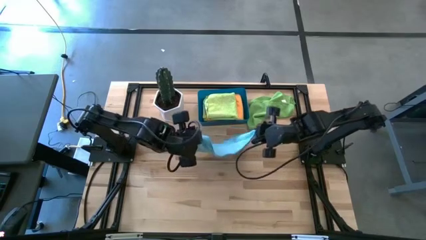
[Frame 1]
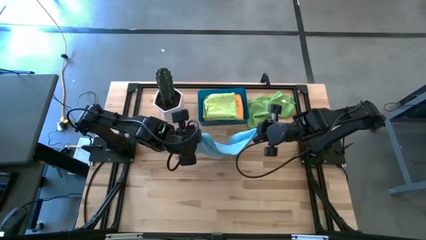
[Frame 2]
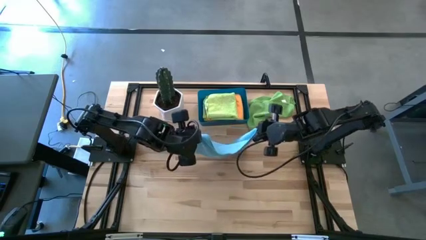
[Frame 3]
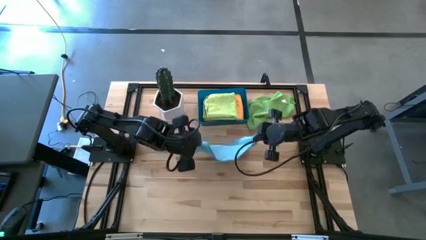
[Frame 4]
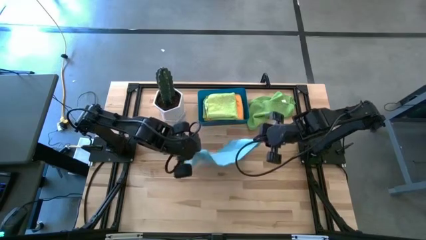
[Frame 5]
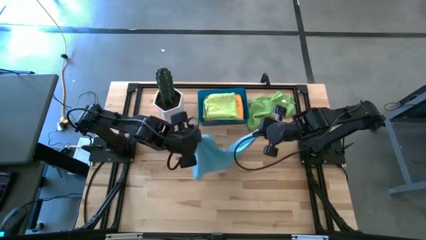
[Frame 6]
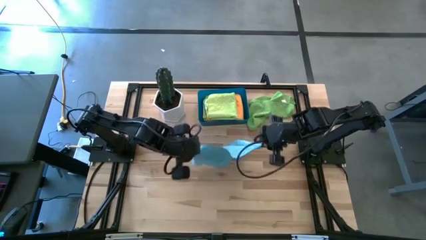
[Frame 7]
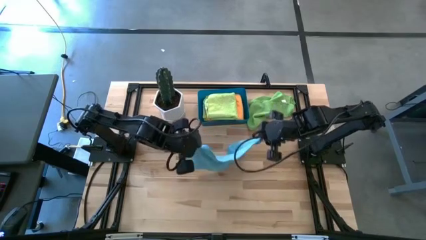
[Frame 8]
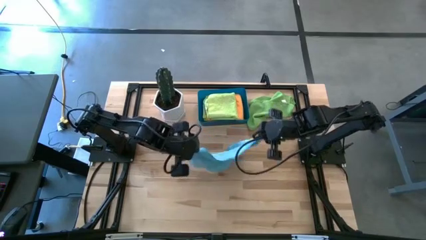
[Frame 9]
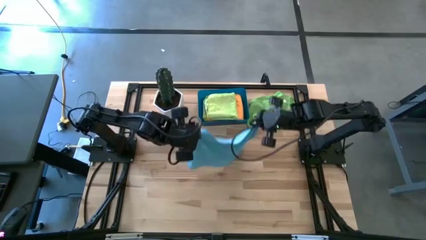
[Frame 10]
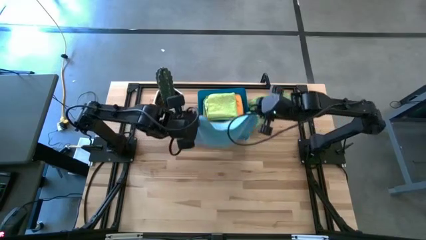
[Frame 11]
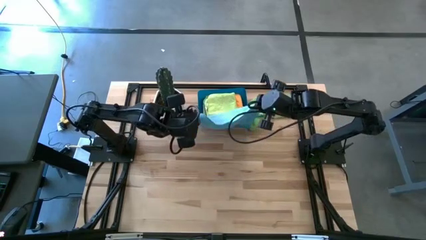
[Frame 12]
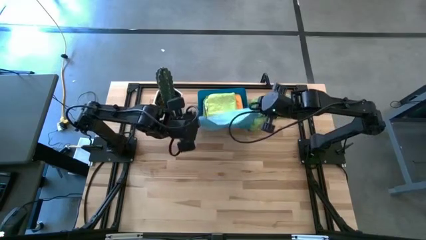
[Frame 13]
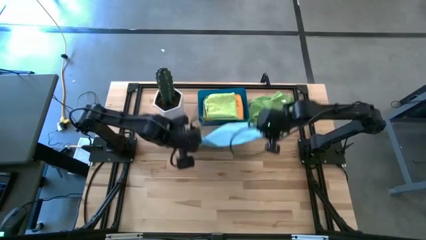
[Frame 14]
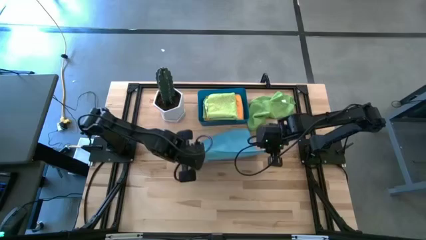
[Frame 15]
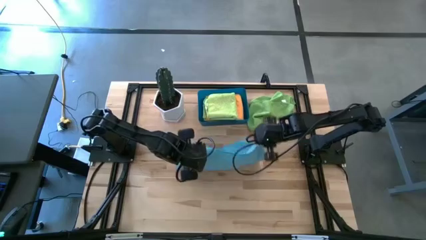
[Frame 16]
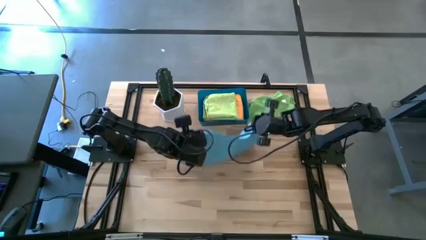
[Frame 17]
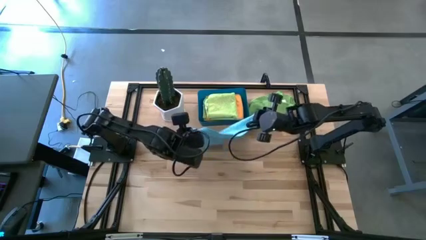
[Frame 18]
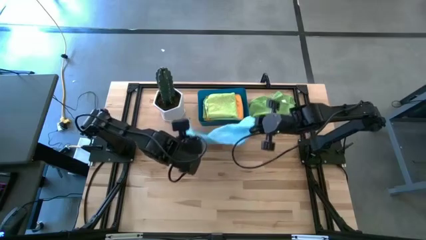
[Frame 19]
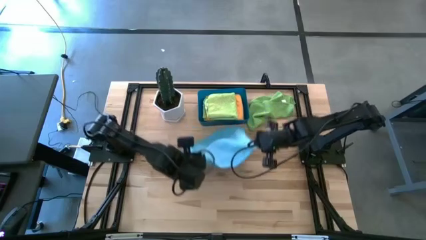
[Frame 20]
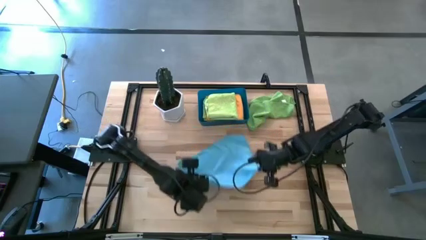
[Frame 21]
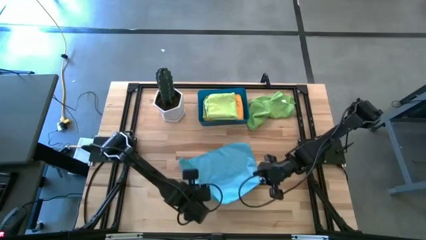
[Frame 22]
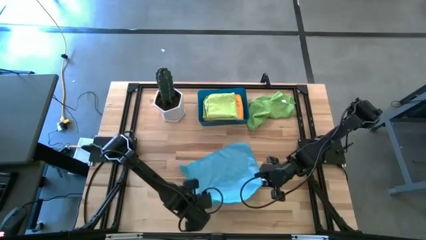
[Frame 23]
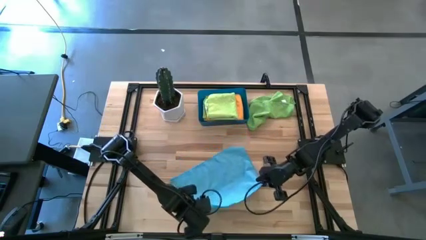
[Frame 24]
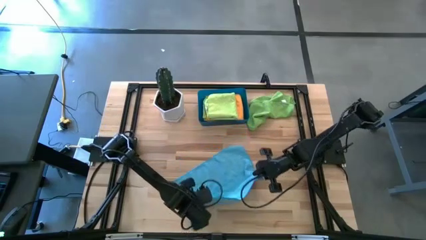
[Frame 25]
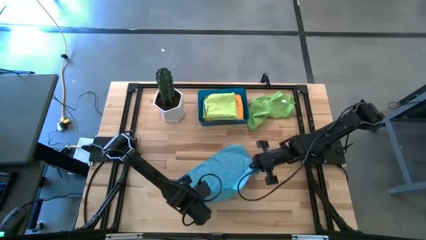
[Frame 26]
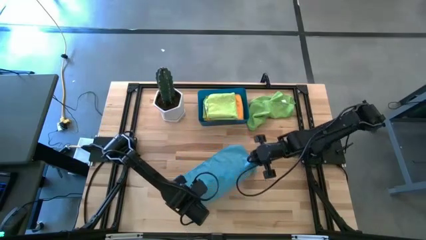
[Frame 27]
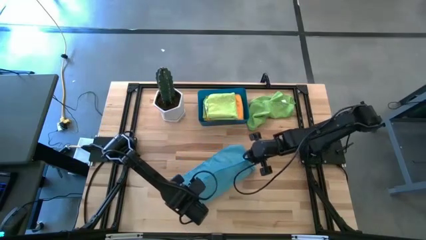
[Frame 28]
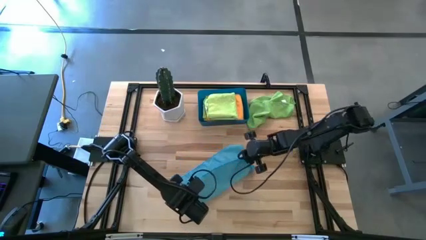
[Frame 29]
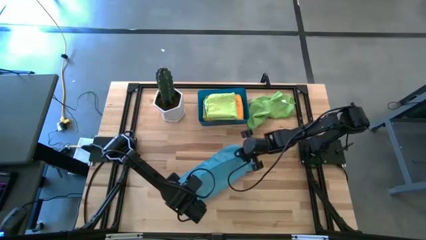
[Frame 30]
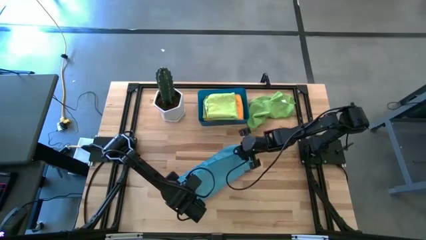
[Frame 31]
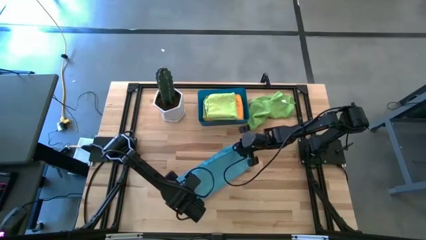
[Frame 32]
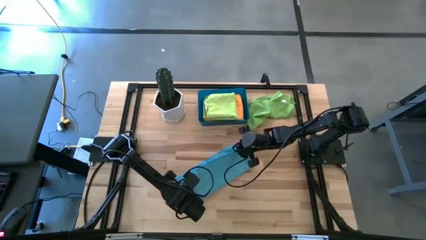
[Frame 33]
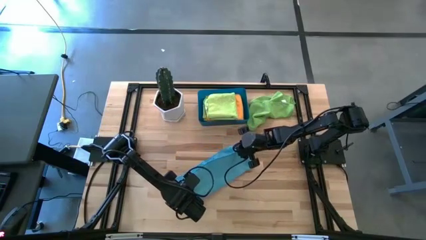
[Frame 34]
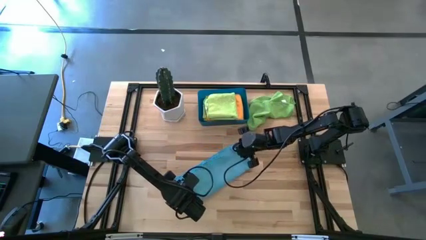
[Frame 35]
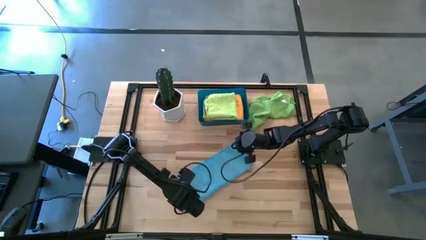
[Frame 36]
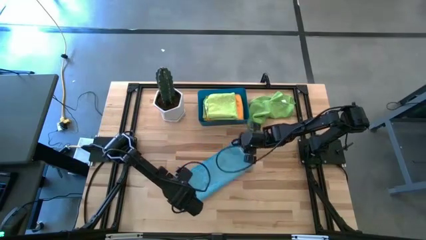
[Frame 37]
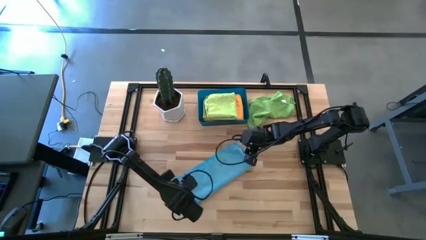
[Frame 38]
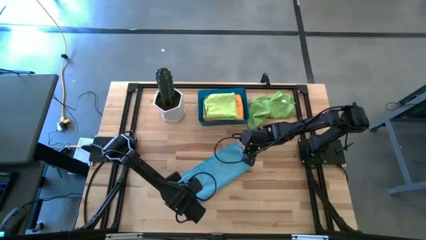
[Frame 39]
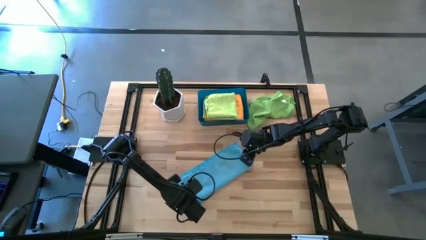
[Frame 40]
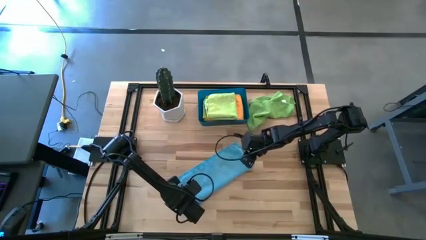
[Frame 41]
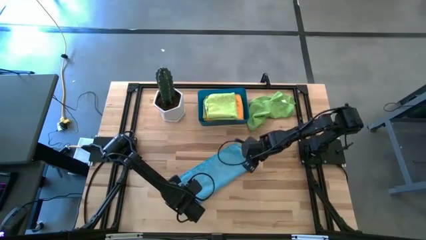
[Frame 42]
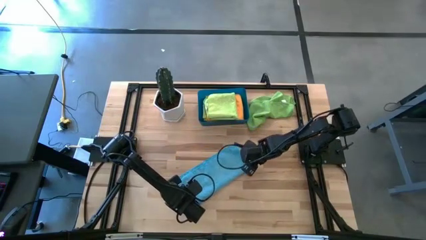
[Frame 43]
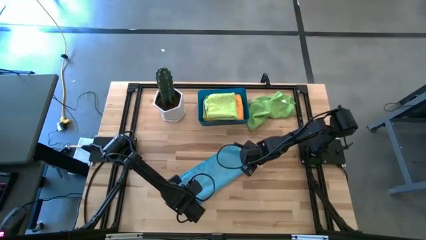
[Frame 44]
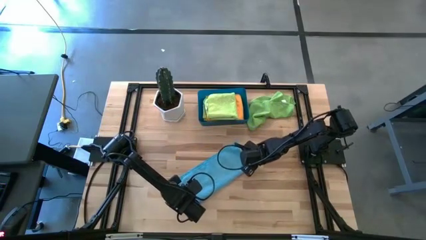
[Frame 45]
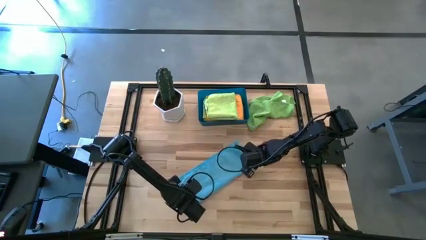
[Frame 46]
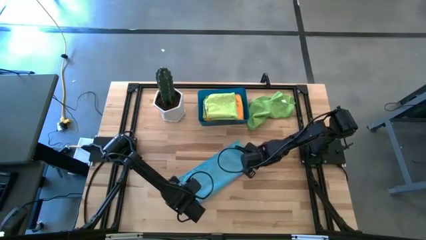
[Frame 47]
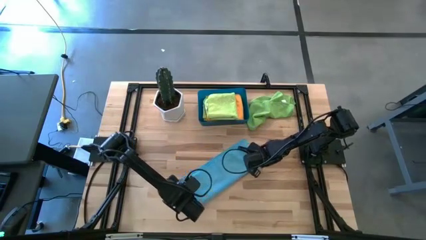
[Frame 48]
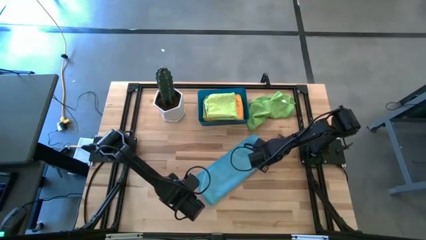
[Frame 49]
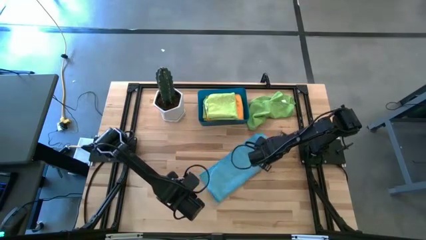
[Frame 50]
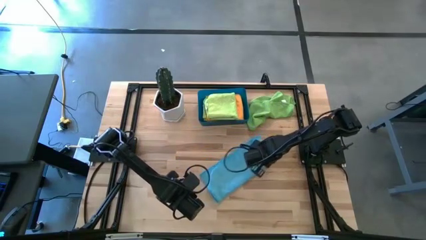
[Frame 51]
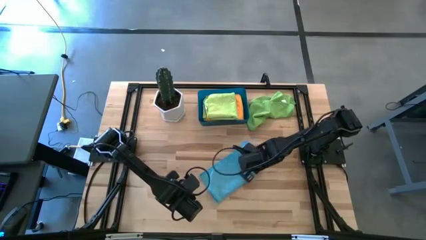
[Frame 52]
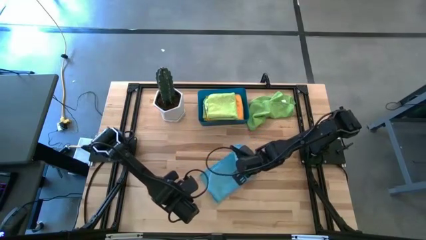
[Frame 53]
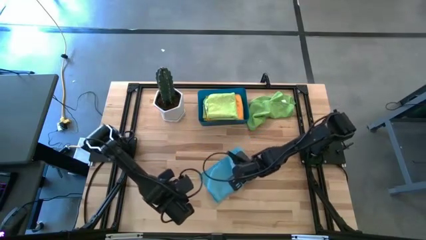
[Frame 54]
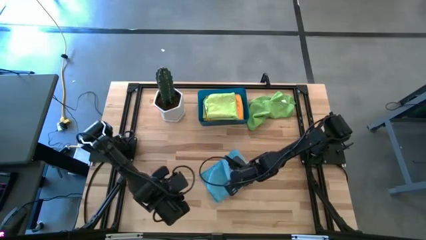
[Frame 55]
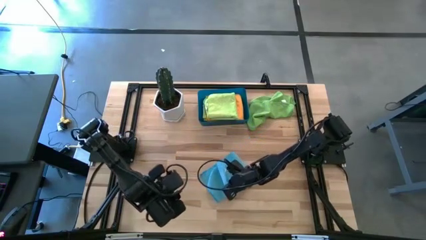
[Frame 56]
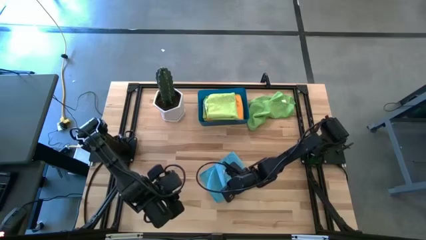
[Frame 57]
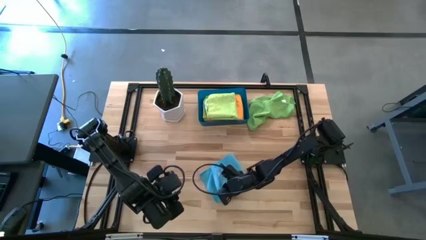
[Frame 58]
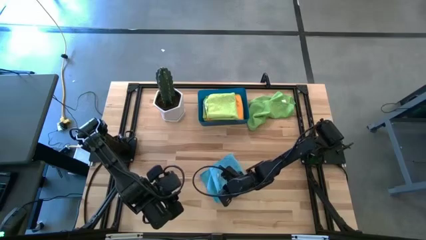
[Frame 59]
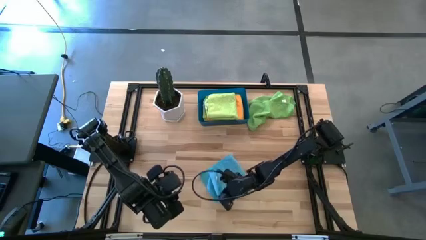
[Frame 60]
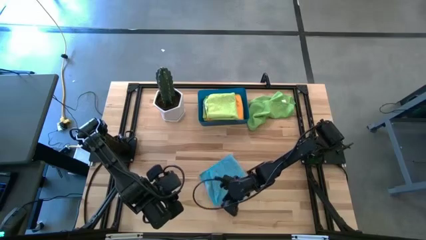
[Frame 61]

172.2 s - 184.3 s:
Task: Fold microfiber towels
Fold the blue microfiber towel

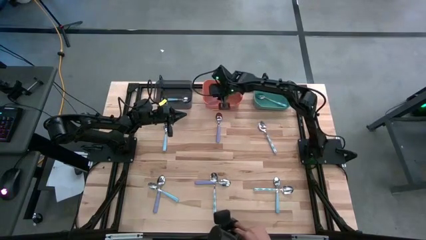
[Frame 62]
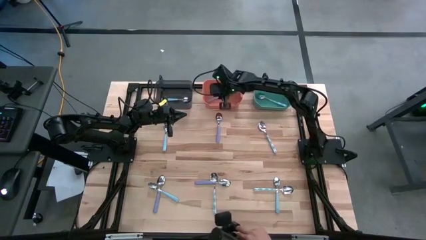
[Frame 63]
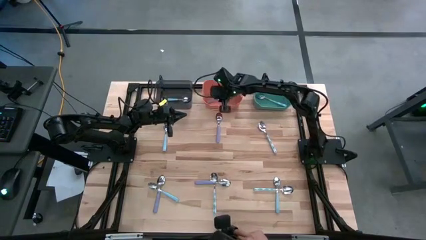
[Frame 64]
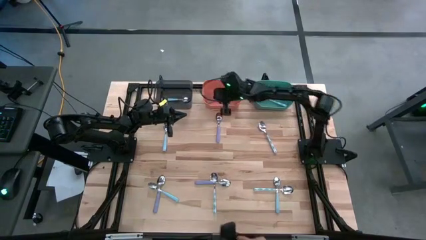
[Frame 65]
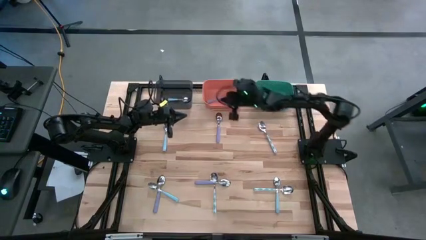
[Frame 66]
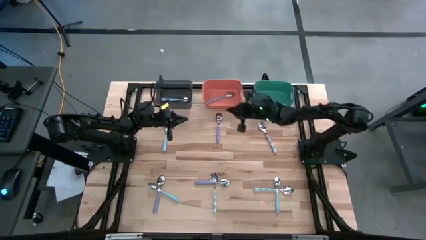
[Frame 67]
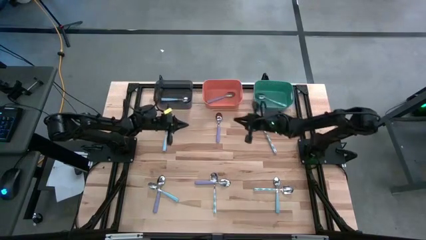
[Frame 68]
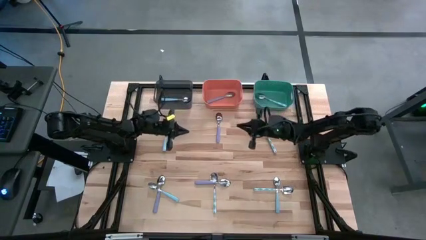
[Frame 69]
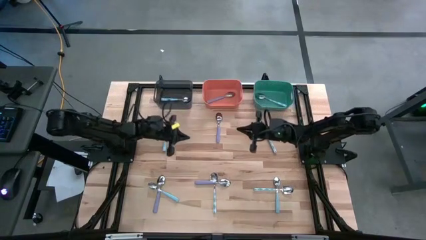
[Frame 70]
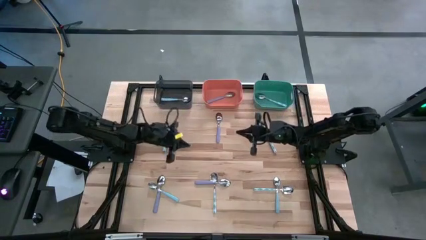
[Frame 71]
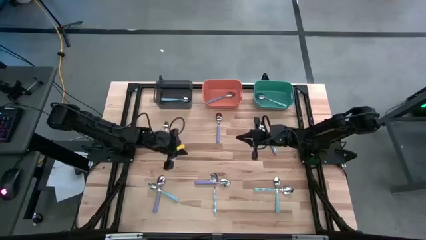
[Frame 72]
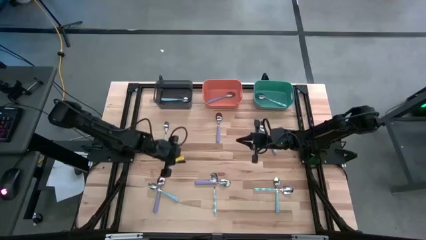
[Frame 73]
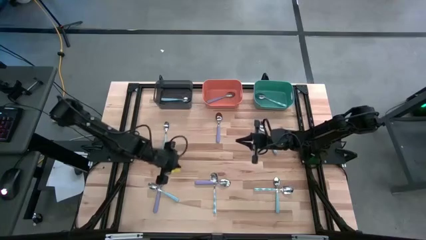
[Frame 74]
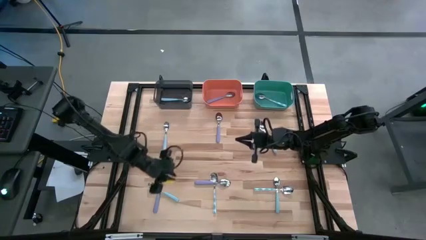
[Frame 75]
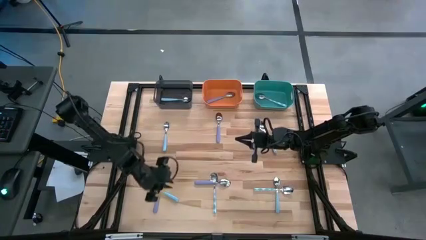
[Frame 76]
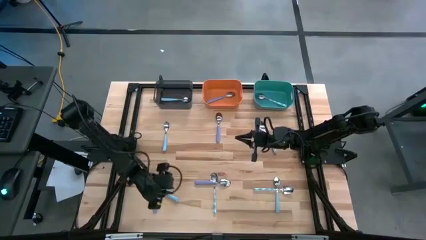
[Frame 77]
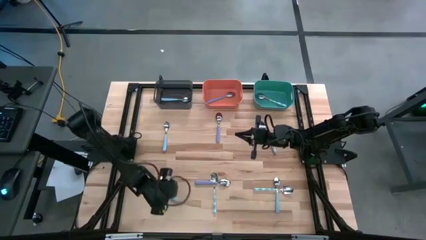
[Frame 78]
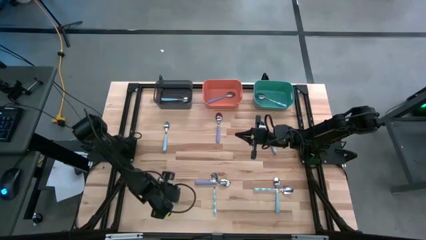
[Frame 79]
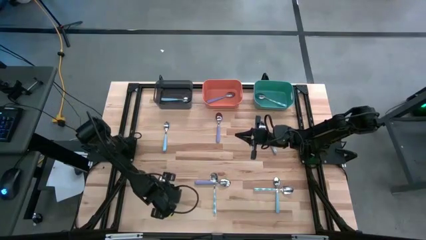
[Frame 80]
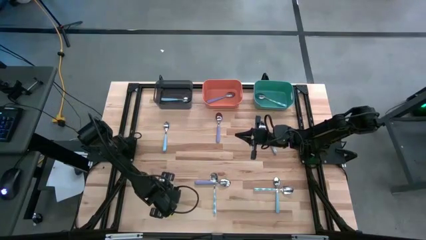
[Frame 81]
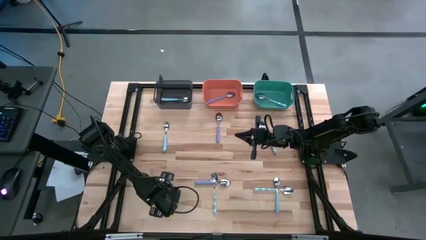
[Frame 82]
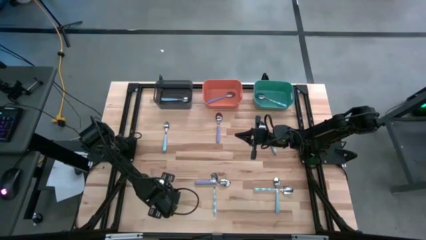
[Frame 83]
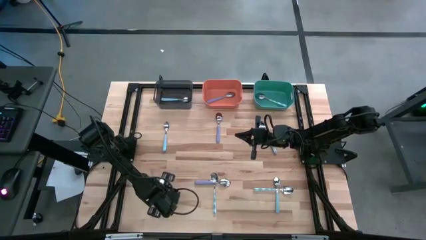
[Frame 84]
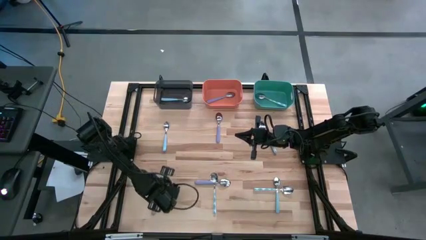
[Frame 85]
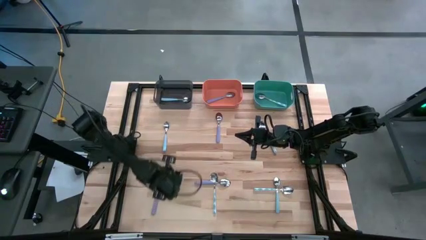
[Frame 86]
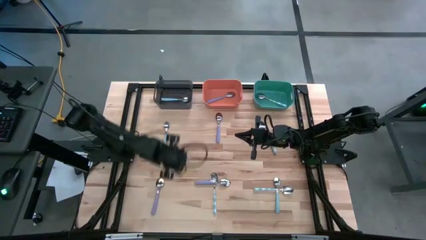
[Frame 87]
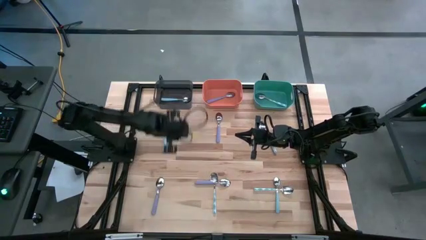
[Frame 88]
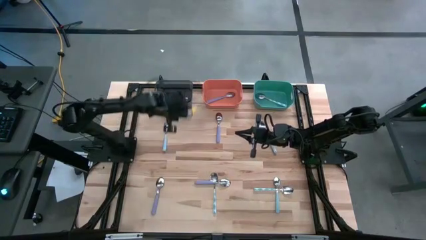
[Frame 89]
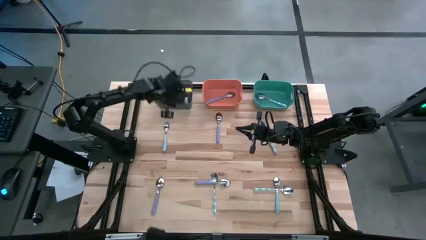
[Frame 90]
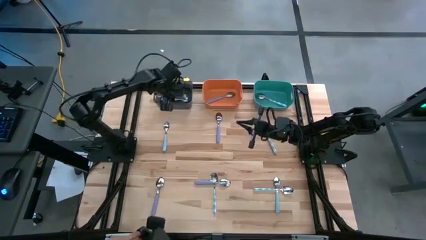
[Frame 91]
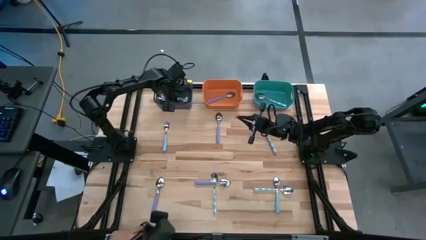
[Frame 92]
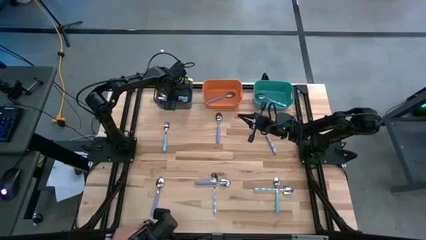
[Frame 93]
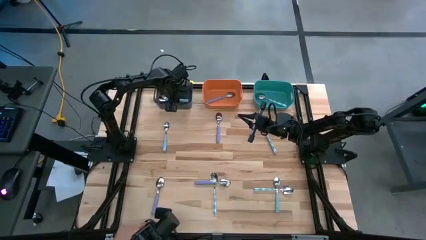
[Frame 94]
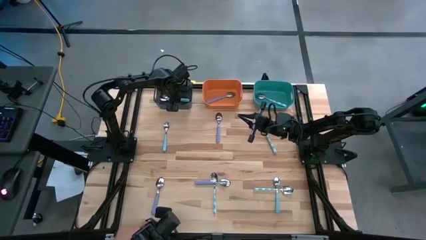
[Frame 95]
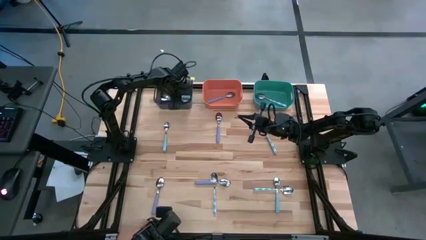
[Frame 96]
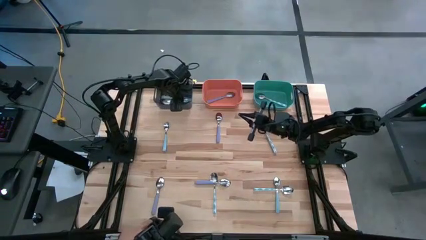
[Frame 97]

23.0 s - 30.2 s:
Task: Sort silverware by color (type)
Put the light blue spoon into the black bin
